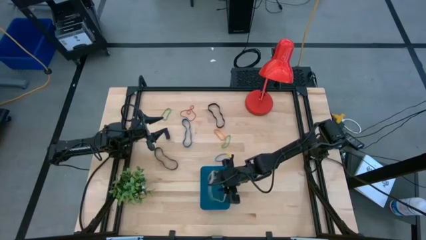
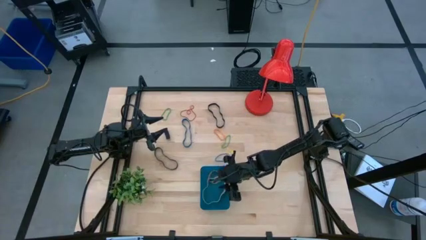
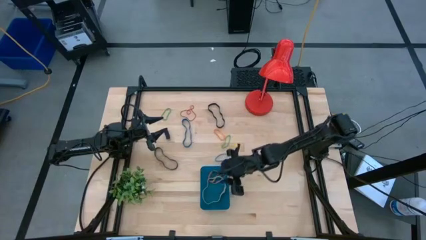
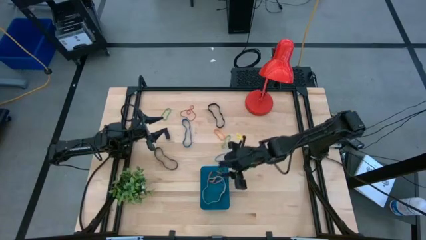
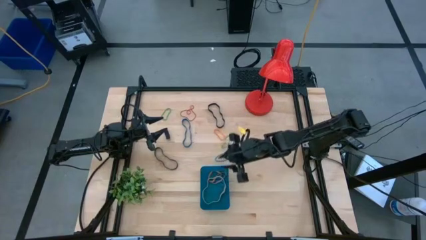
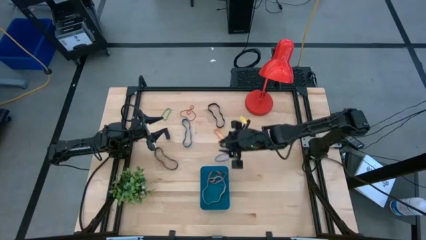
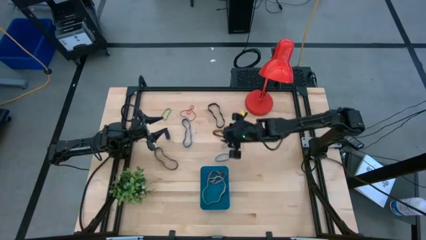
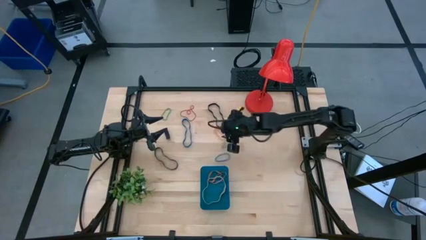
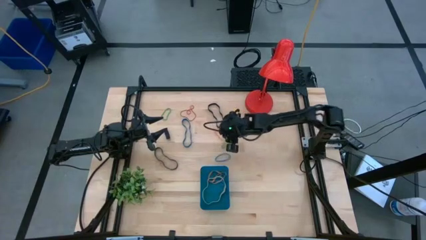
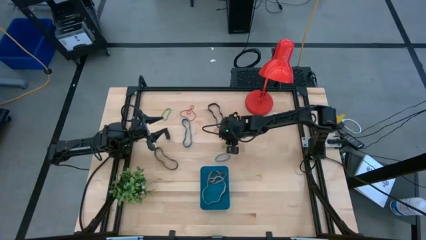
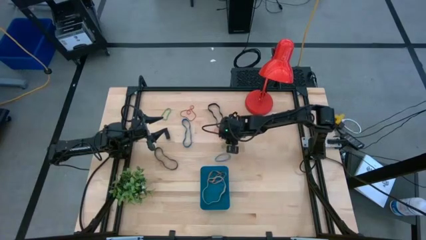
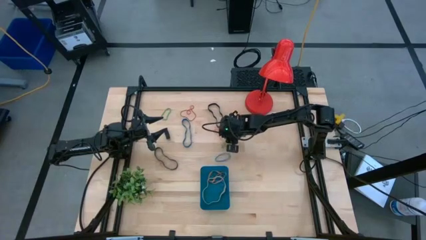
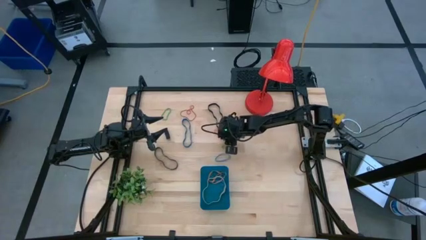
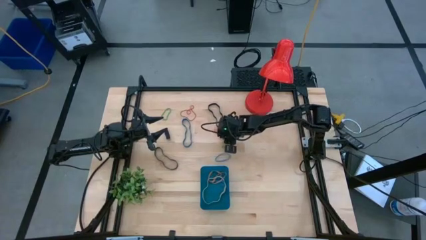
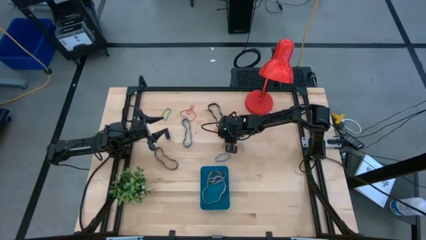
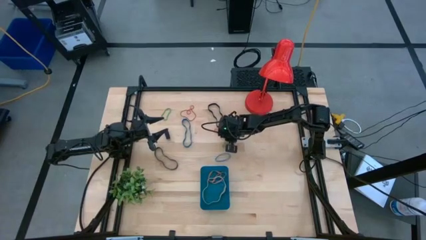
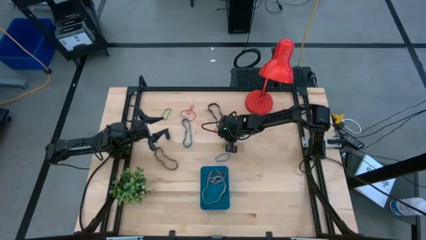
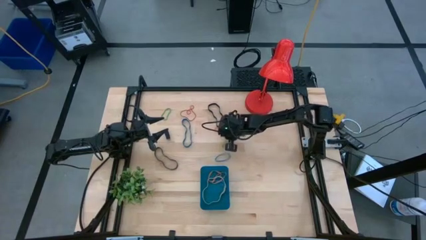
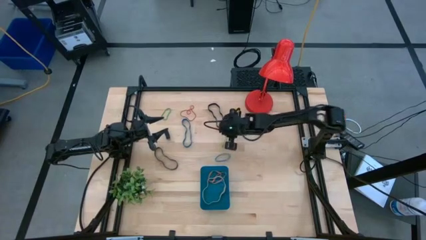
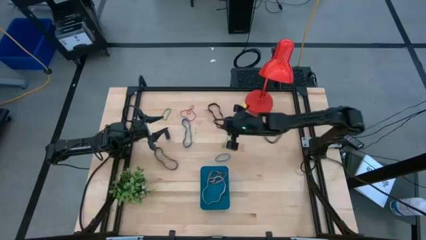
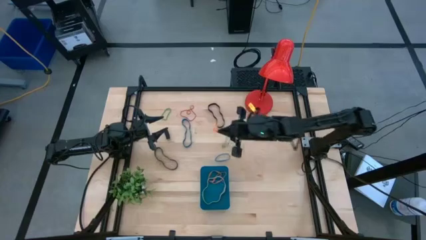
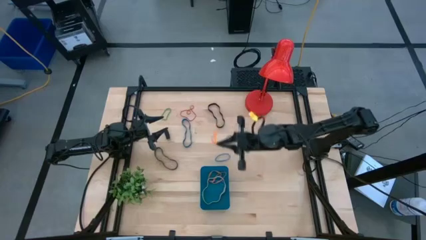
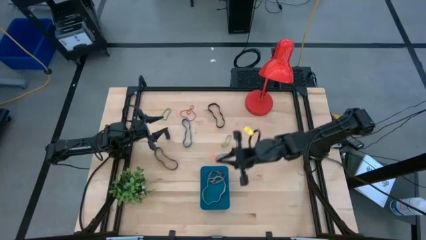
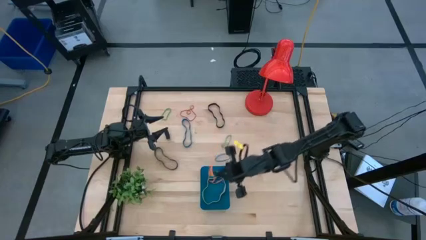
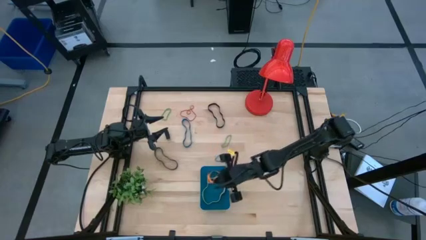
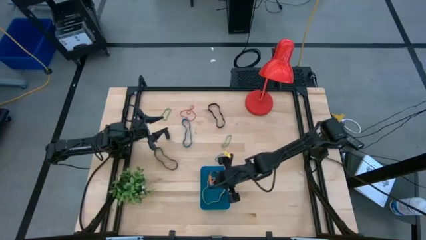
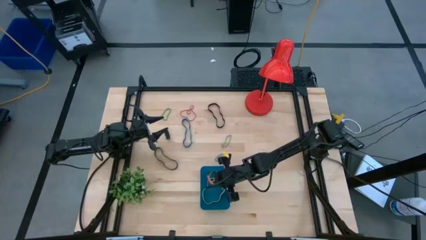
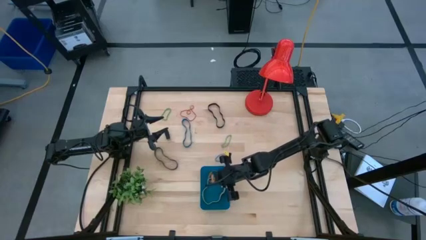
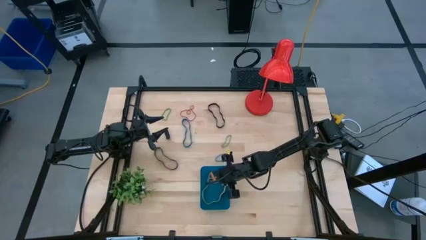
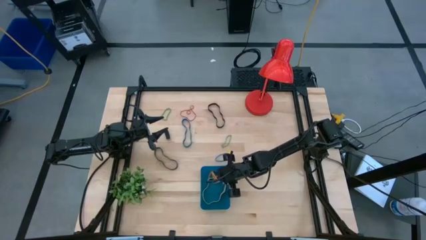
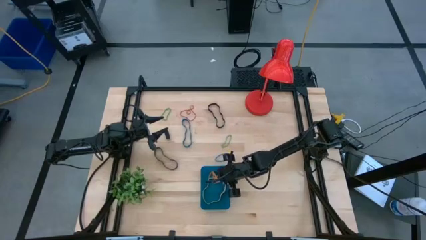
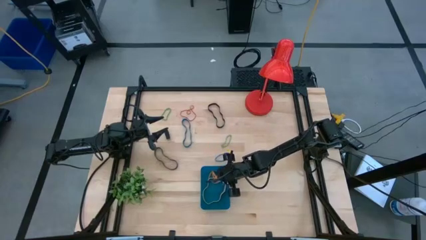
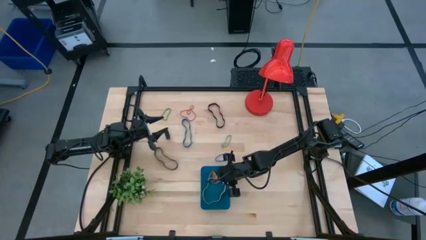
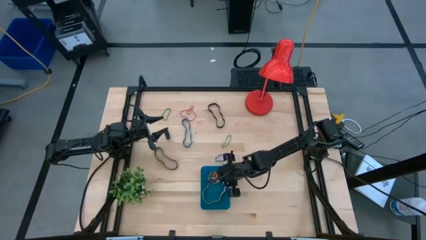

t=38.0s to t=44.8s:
Task: Pick and place rubber bands into bin
Put the orange rubber band into the blue bin

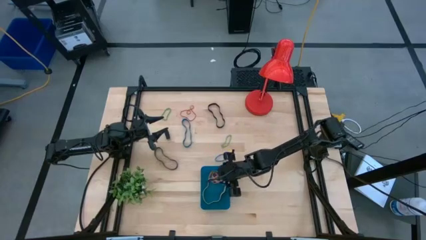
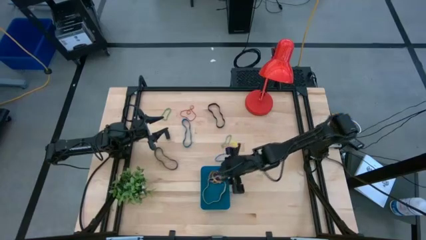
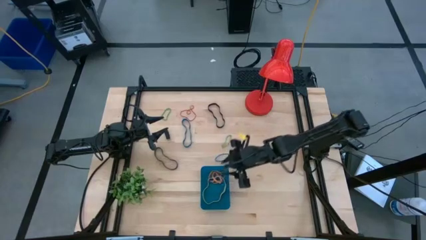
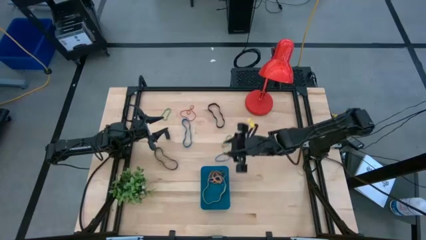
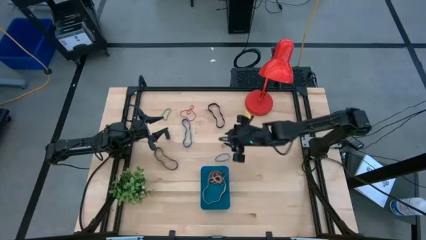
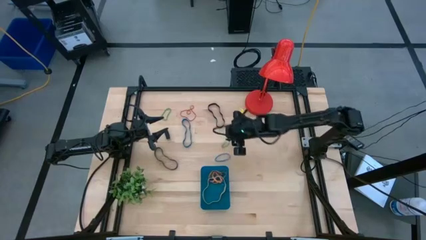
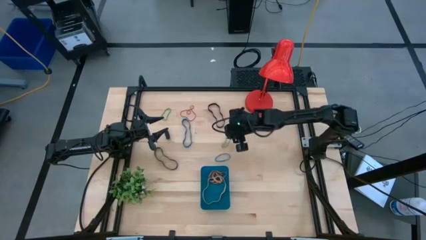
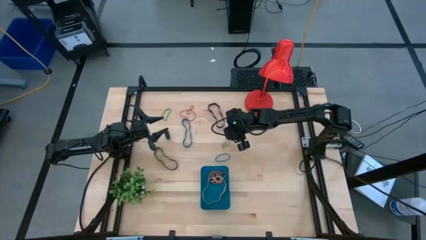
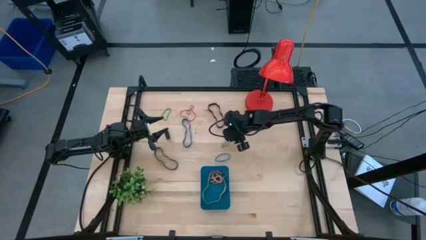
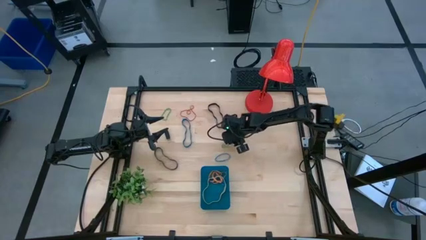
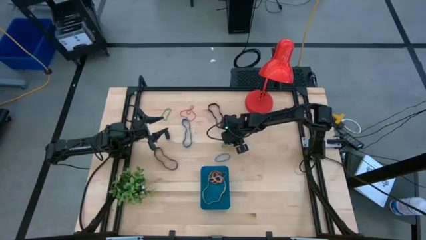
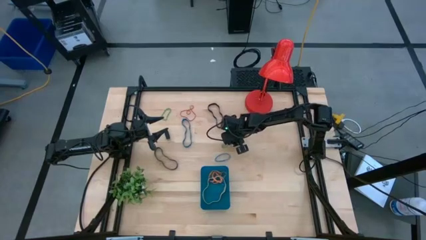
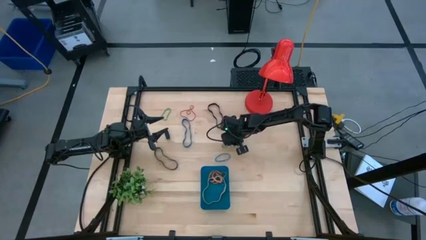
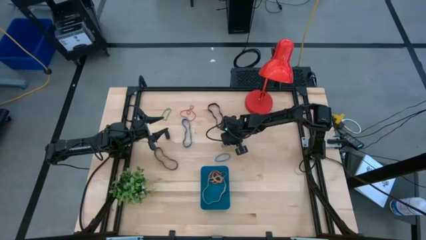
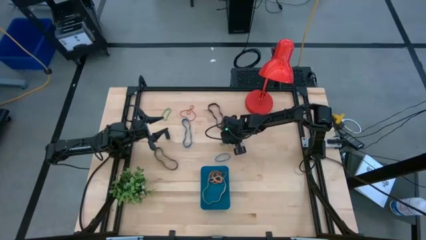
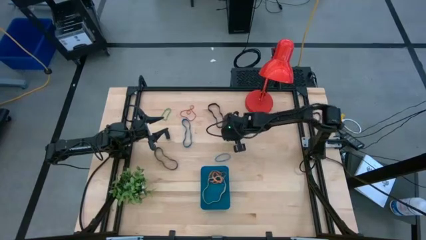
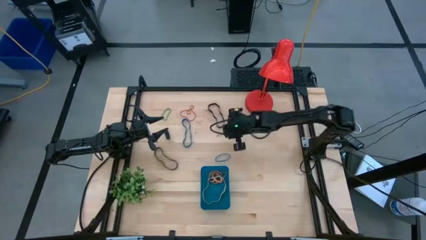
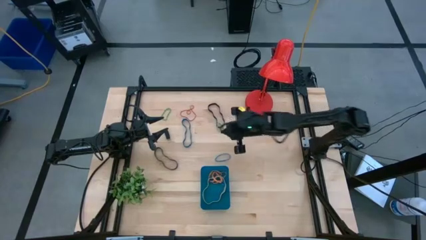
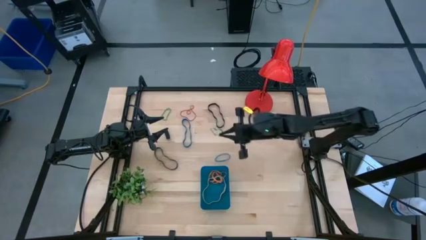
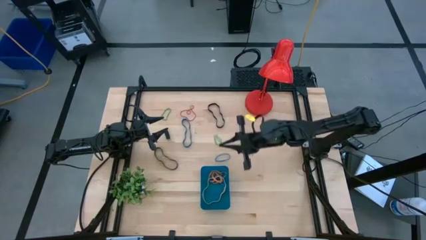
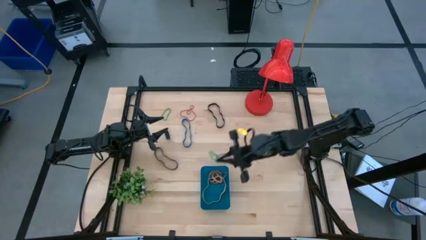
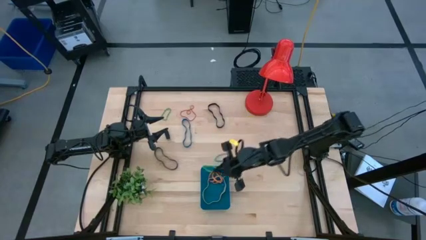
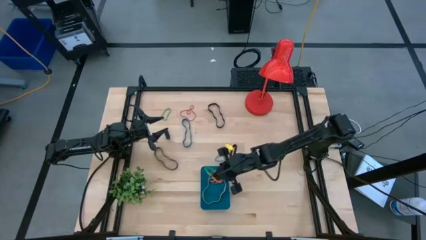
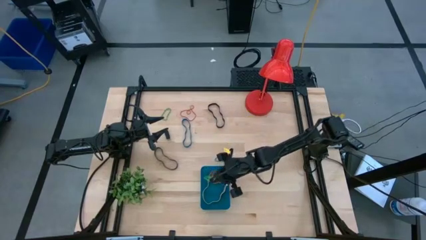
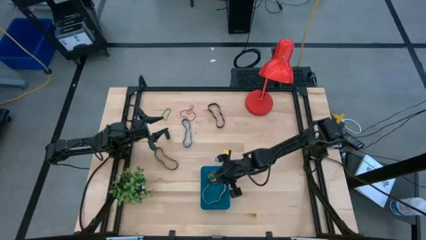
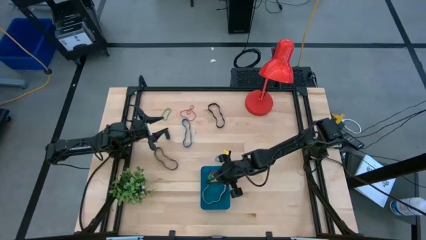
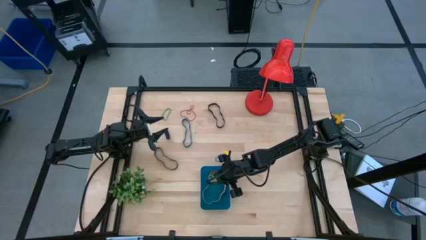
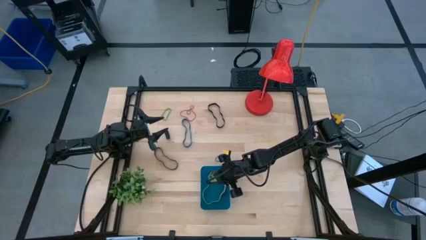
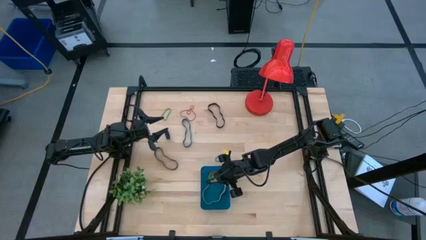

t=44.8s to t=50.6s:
Put the bottom green rubber band into the blue bin

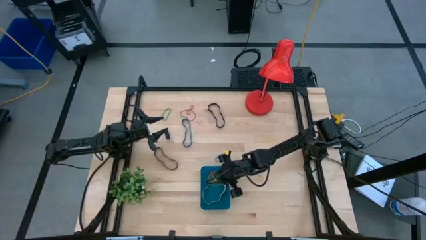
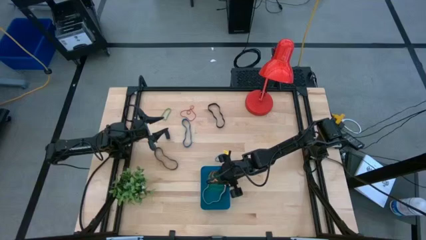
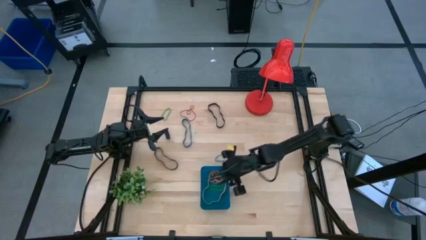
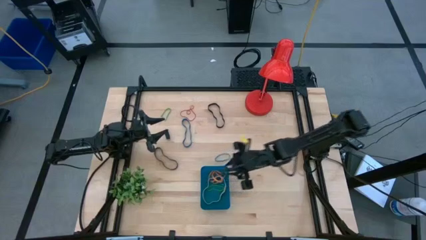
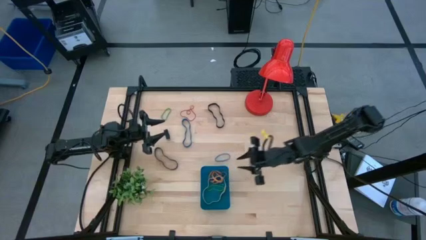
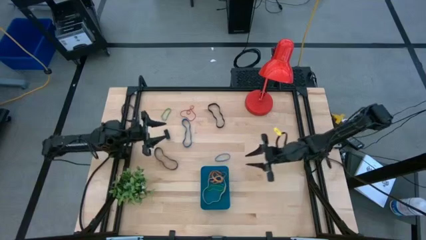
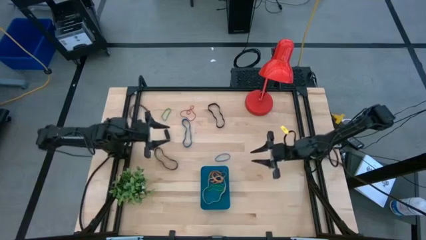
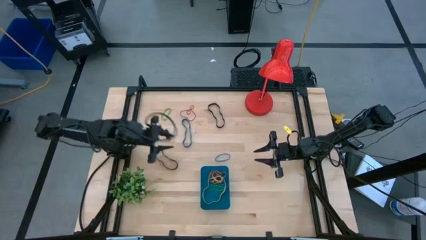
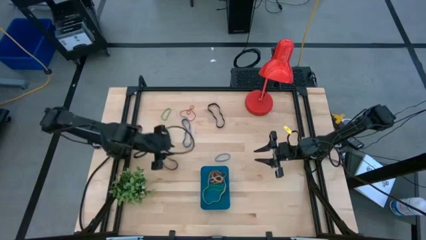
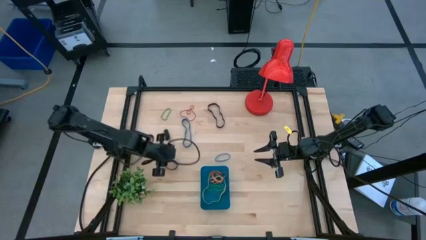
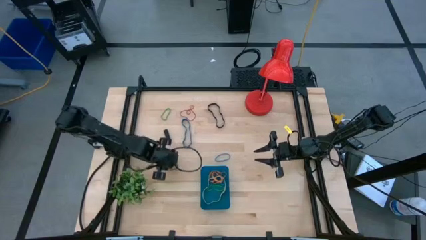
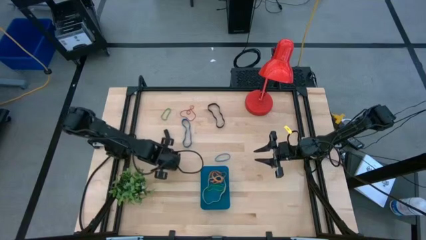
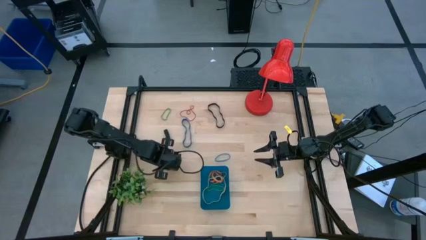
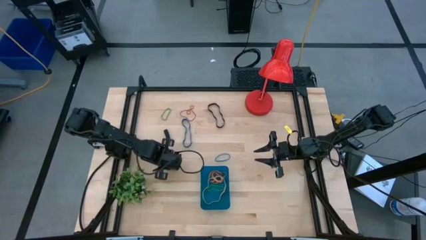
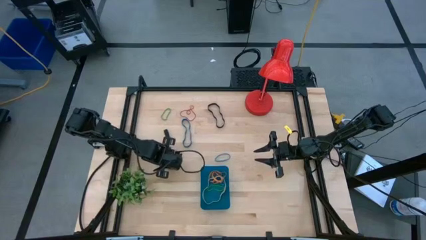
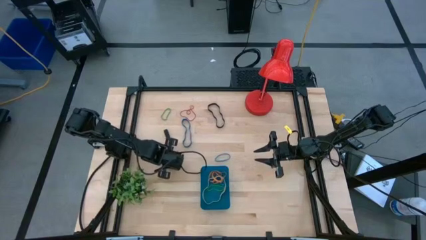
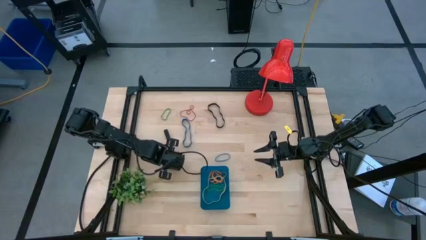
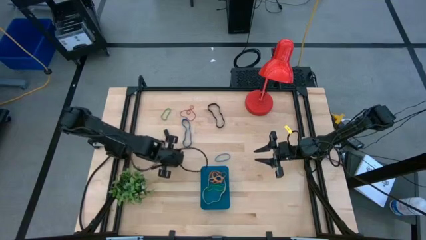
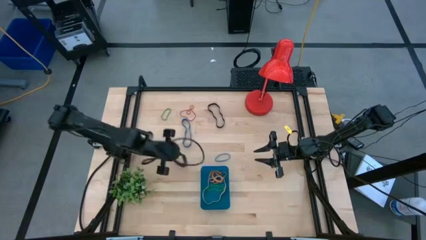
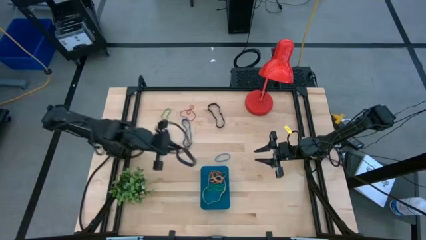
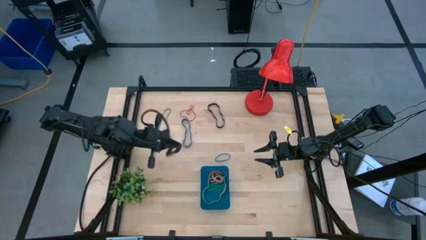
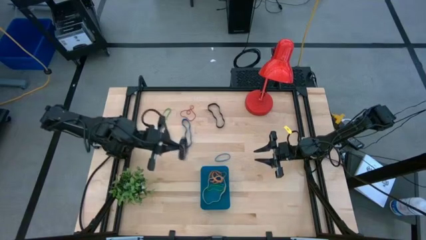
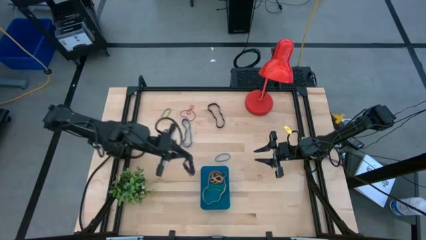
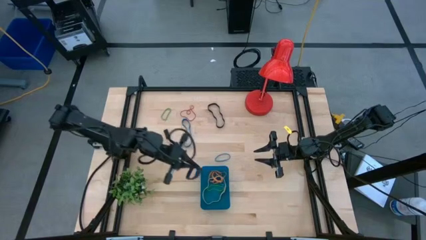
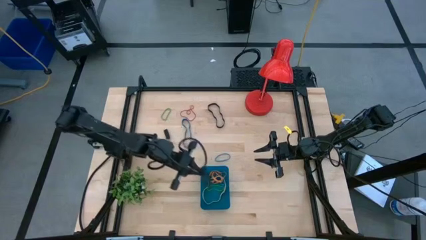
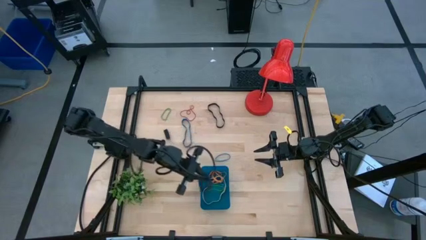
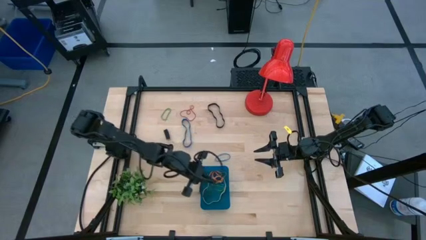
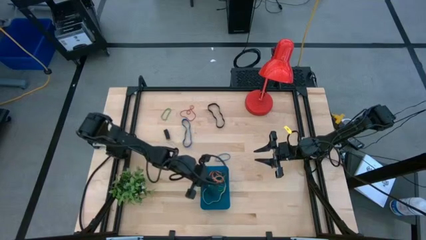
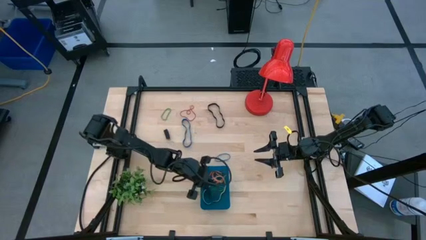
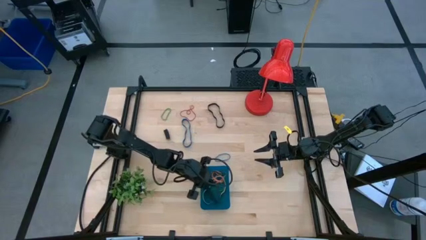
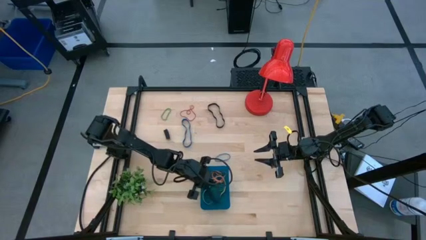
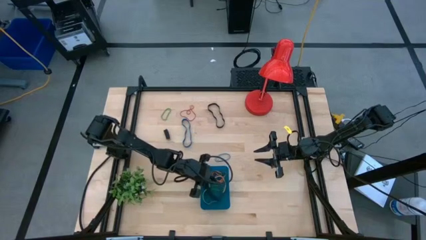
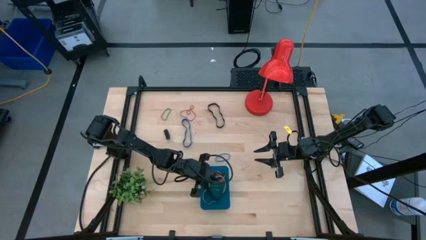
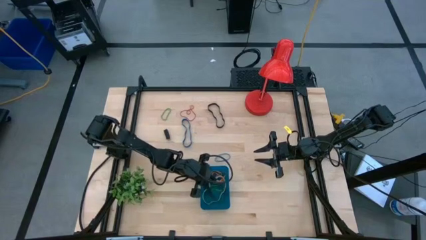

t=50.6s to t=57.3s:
Put the bottom black rubber band into the blue bin
